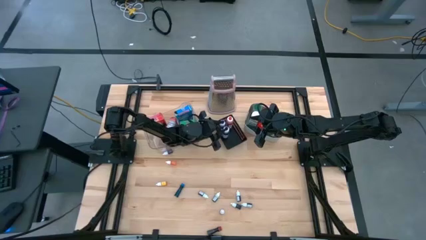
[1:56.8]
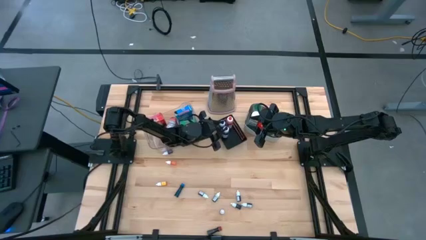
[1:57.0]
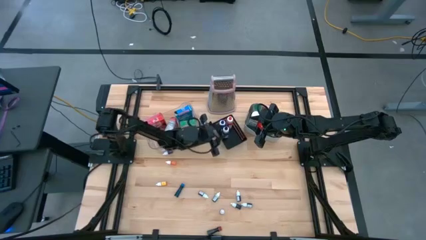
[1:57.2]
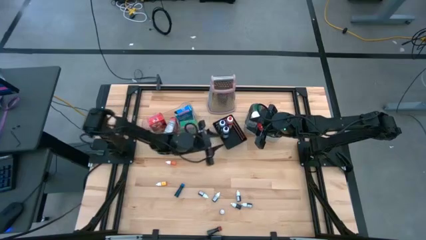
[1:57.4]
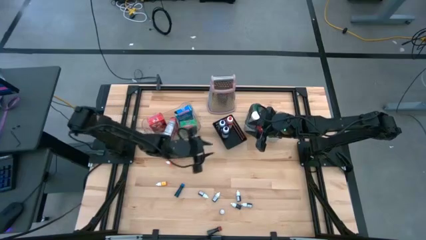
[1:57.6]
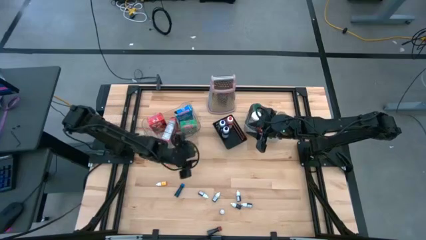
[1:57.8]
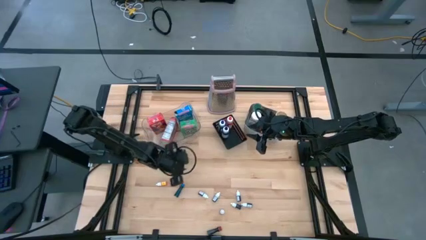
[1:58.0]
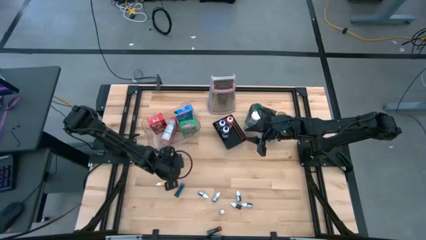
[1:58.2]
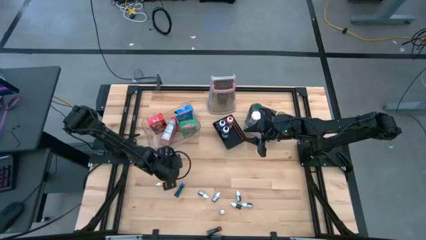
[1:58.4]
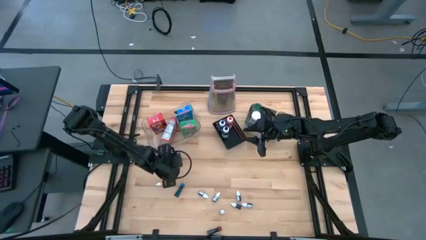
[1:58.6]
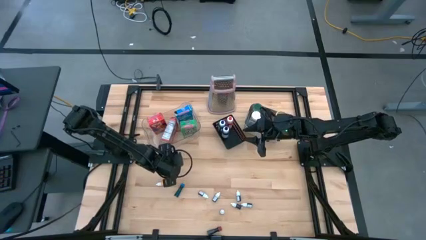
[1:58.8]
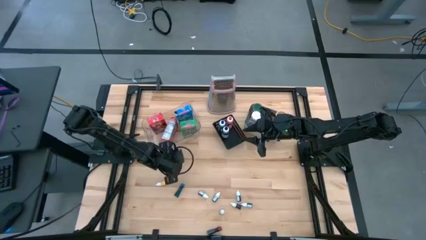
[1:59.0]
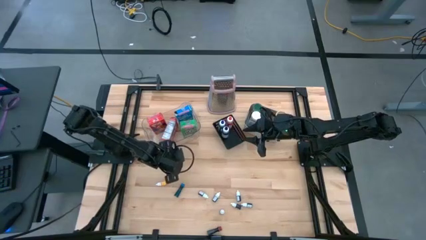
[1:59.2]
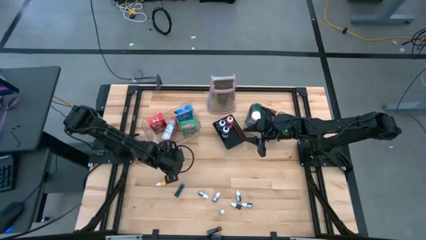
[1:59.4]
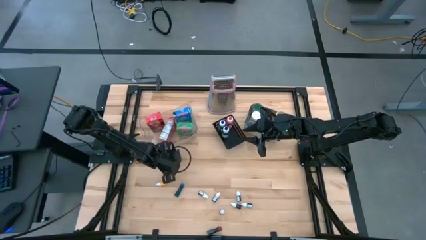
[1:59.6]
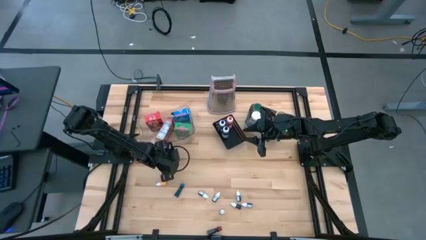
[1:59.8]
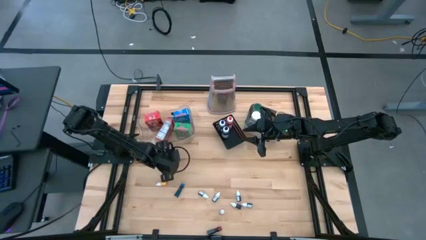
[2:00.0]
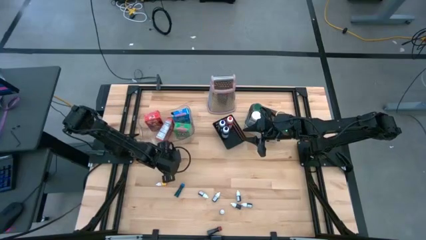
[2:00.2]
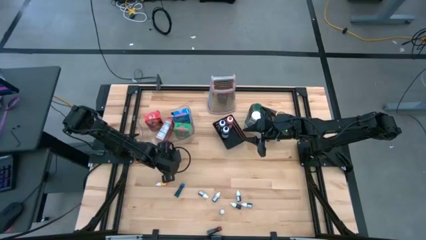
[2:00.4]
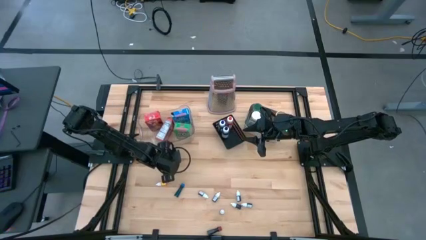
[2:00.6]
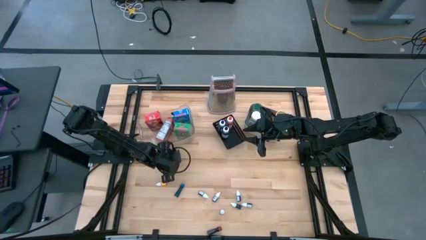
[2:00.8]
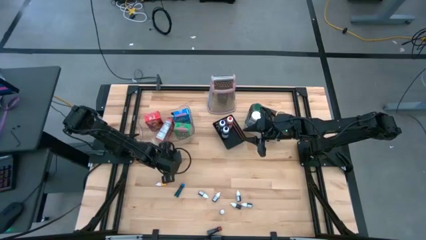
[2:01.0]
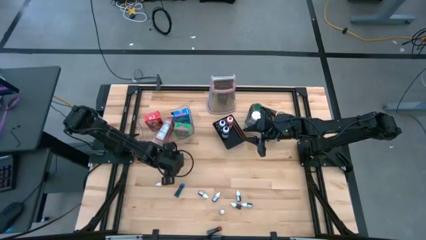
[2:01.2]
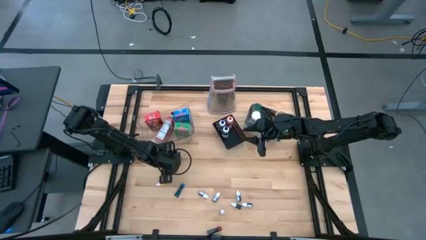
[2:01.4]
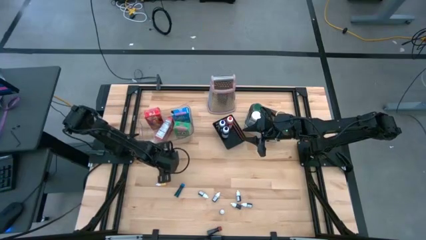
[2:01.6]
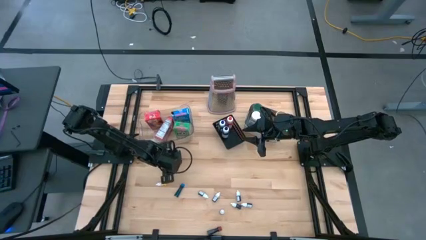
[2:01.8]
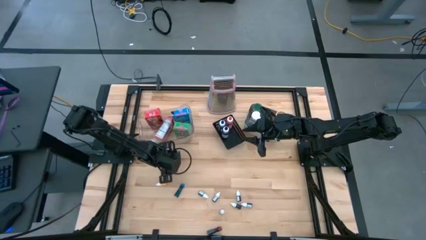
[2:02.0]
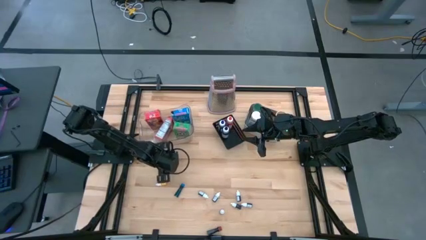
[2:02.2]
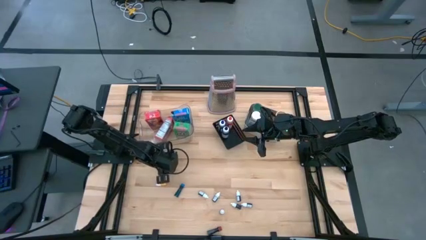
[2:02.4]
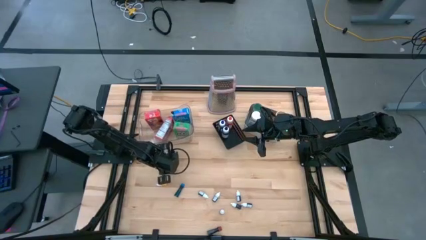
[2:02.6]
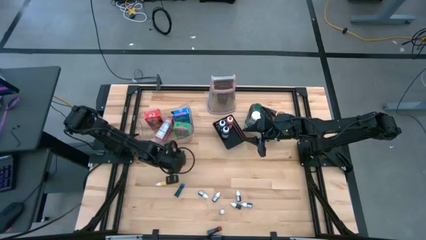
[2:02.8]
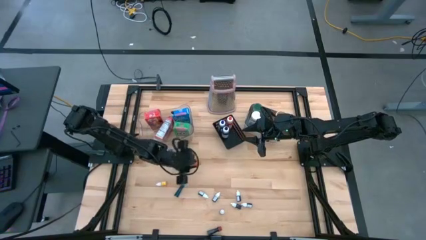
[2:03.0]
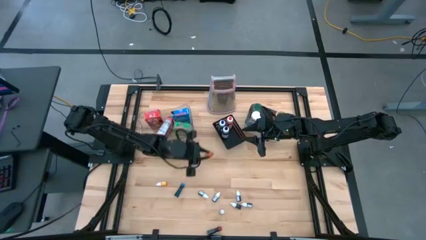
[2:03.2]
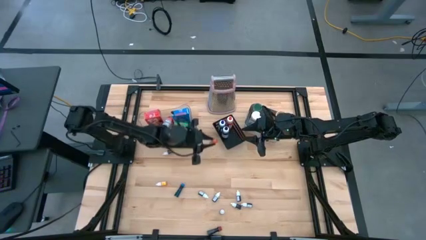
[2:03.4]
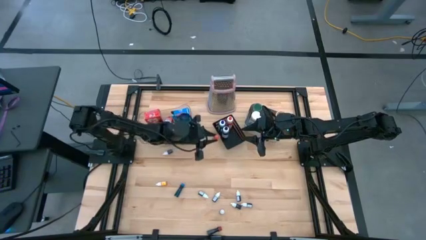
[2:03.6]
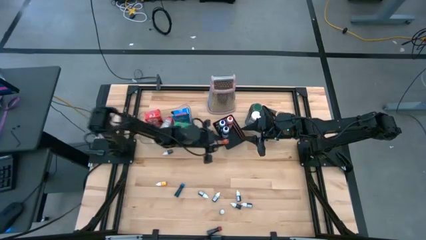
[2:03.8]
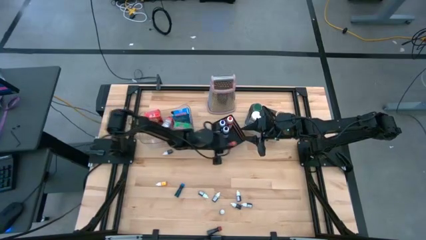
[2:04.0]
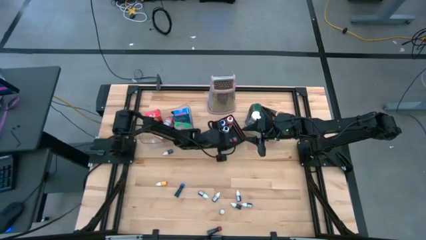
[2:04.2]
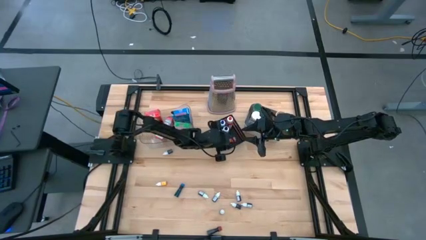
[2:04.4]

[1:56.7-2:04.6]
Task: Pick & Place Kitchen Items
Put the small orange food coloring bottle into the black bin

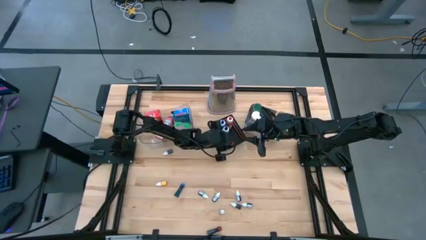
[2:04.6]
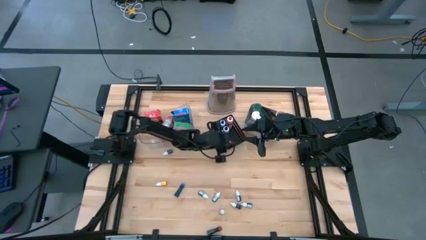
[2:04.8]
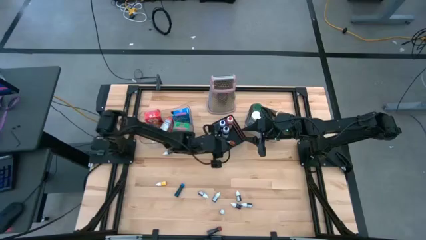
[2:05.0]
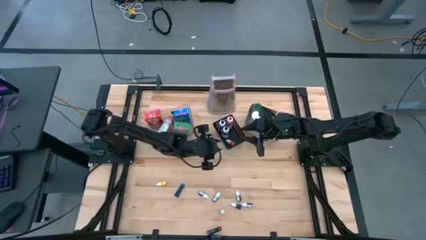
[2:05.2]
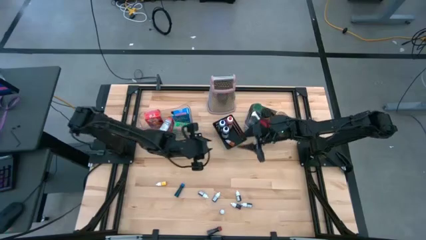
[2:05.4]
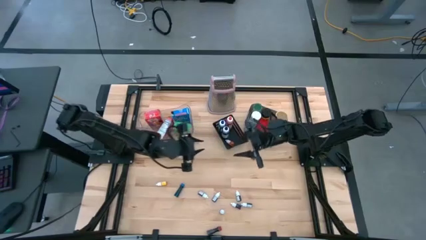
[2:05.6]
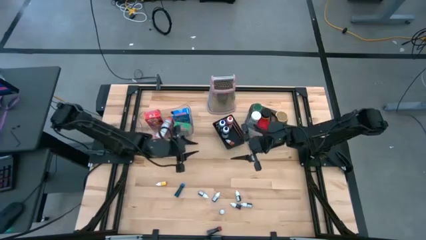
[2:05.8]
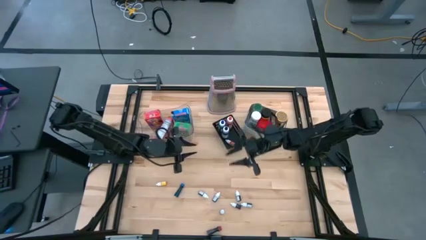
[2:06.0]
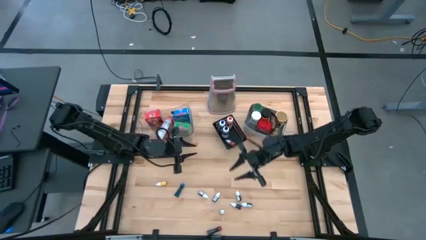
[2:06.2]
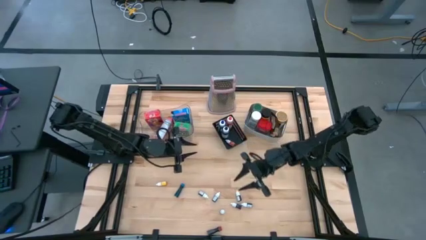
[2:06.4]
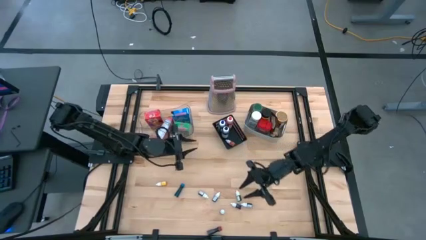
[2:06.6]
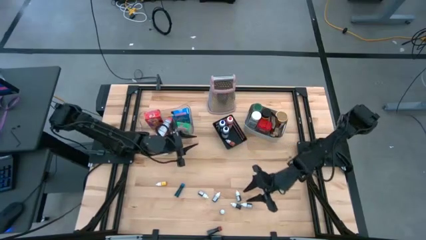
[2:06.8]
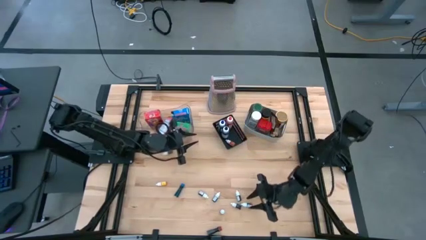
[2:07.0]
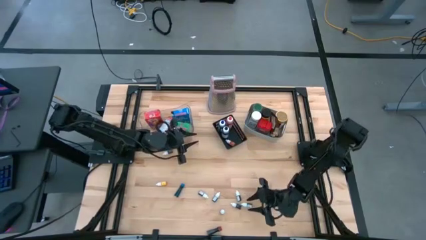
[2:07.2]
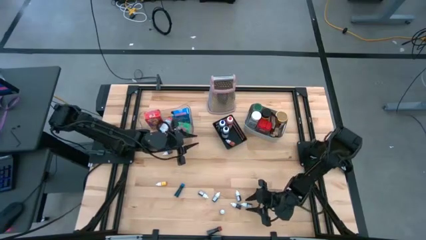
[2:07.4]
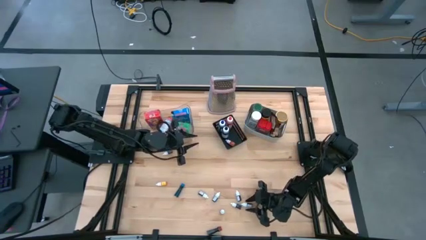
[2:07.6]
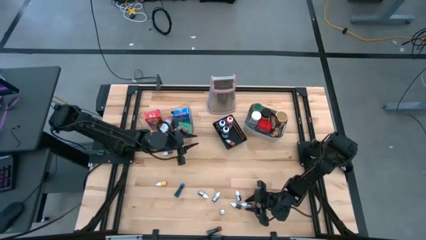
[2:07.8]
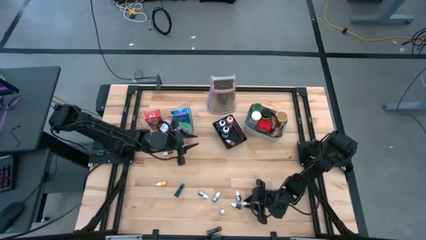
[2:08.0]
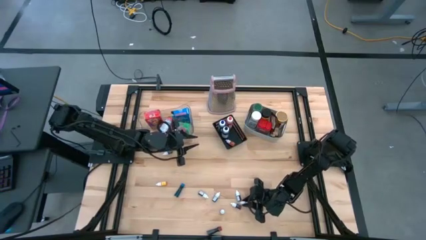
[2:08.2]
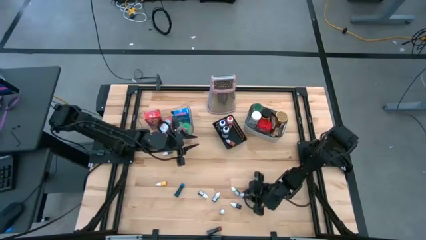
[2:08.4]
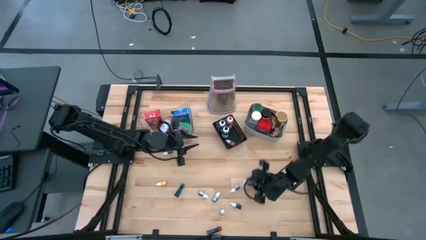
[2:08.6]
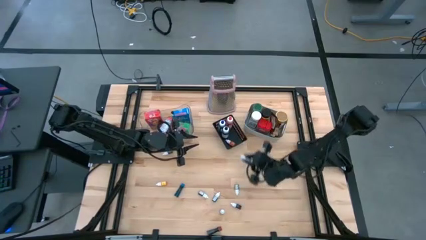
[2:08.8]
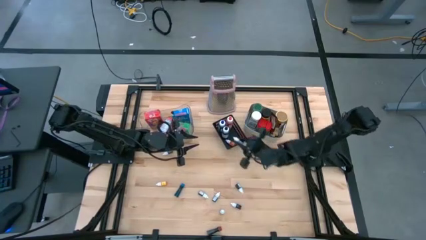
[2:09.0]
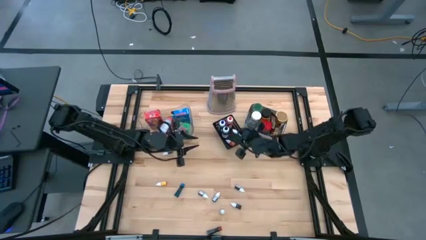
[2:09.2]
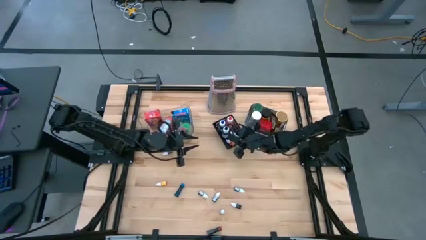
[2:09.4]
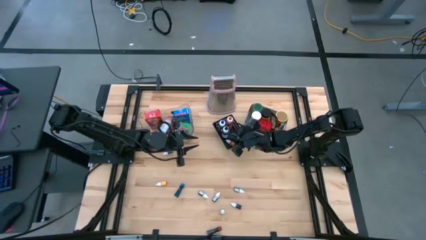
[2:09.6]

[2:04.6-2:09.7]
Put the small black food coloring bottle into the black bin

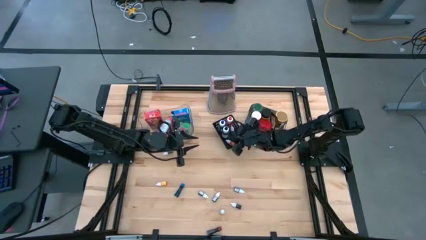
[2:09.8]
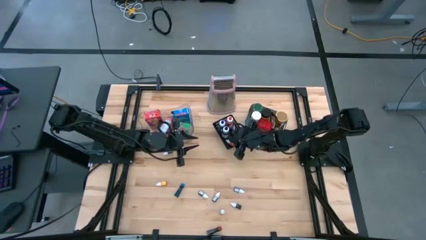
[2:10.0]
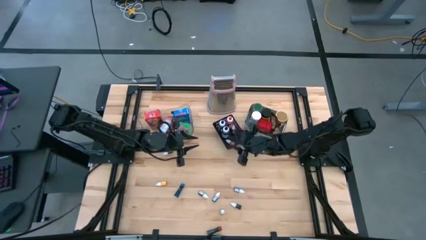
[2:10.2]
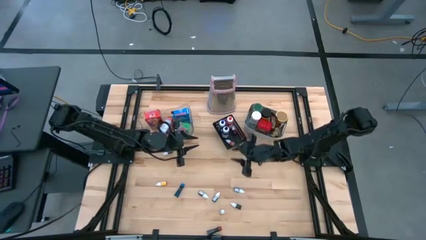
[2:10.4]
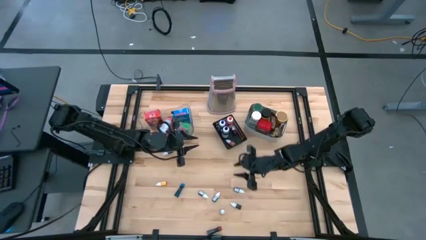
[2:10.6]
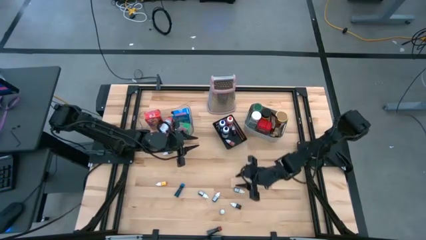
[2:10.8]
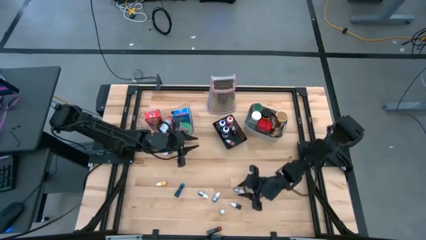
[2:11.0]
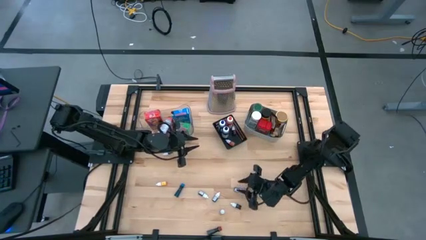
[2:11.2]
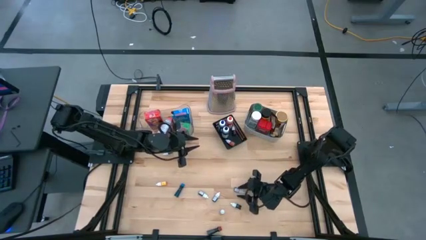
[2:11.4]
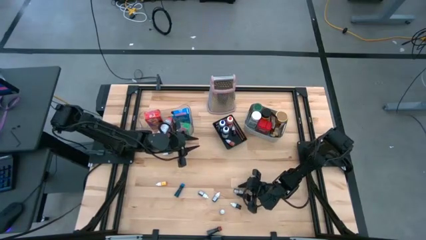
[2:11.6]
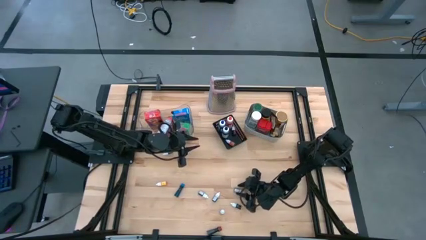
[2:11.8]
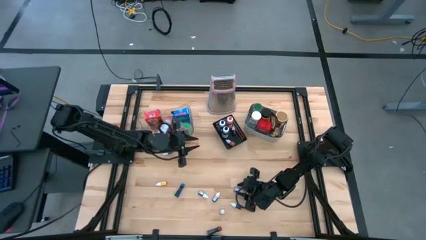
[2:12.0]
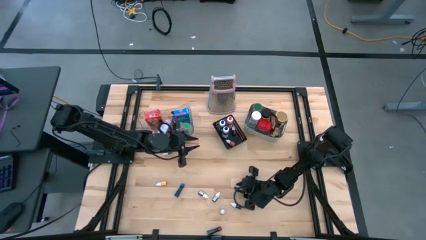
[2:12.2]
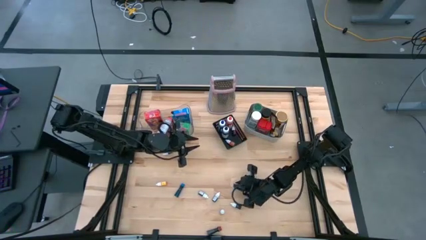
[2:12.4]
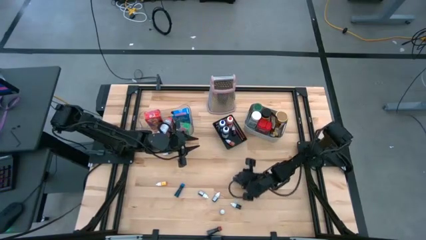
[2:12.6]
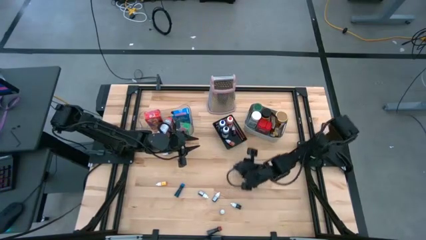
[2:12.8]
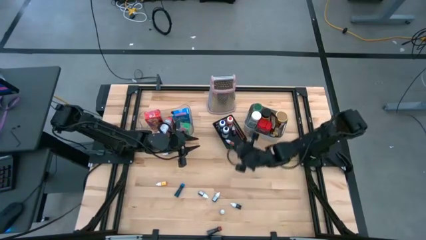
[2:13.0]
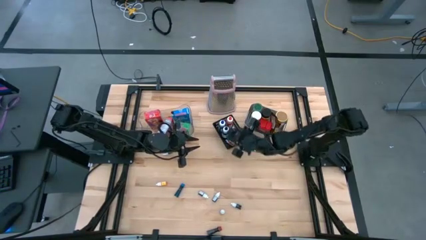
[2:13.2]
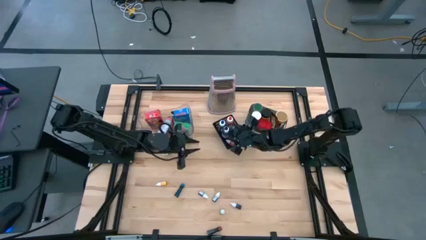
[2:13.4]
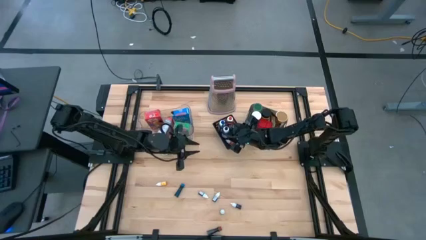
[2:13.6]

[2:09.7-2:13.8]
Put the small black food coloring bottle into the black bin
